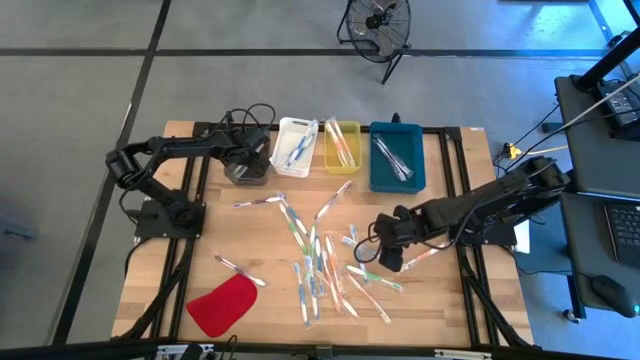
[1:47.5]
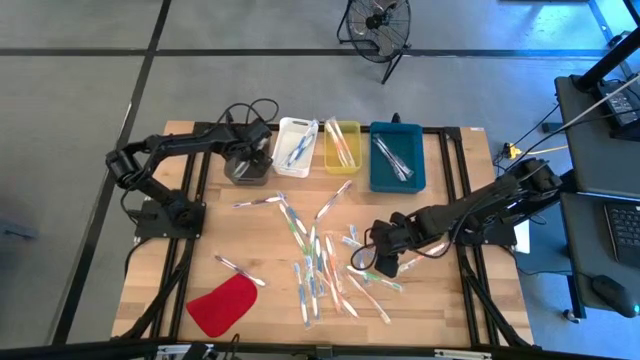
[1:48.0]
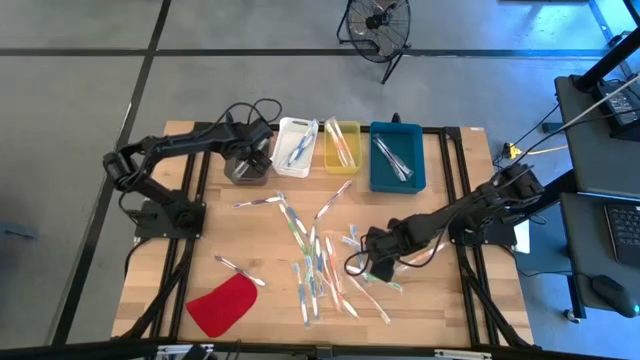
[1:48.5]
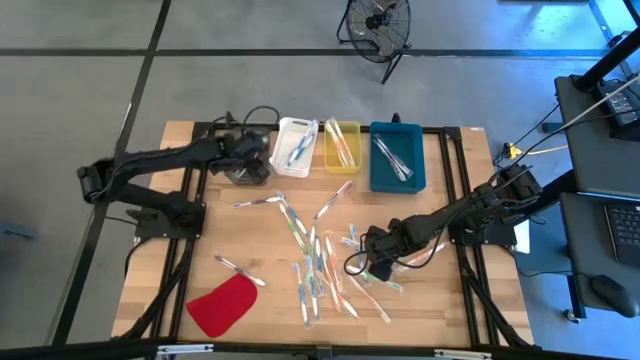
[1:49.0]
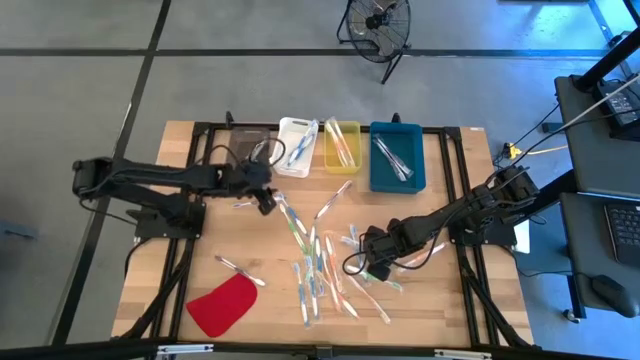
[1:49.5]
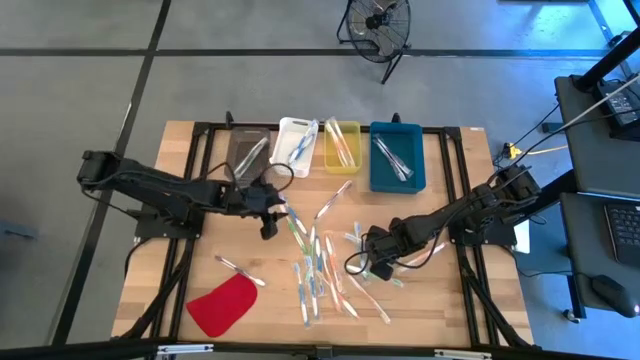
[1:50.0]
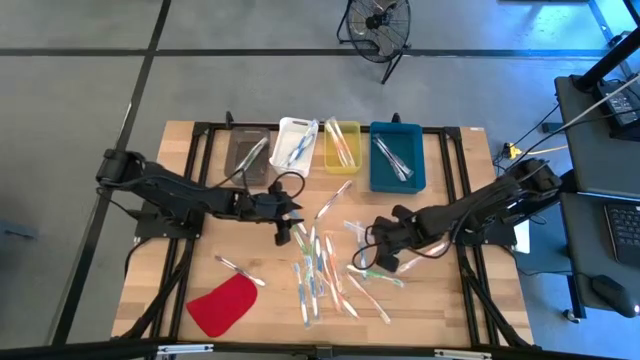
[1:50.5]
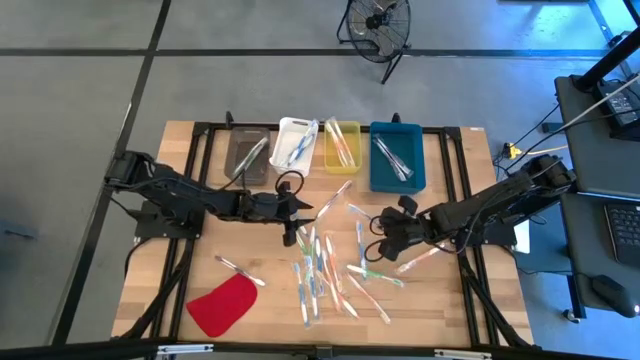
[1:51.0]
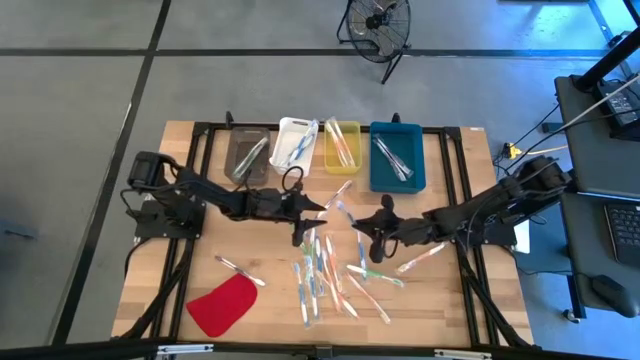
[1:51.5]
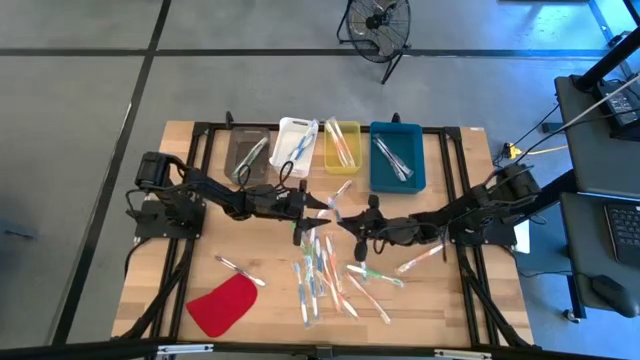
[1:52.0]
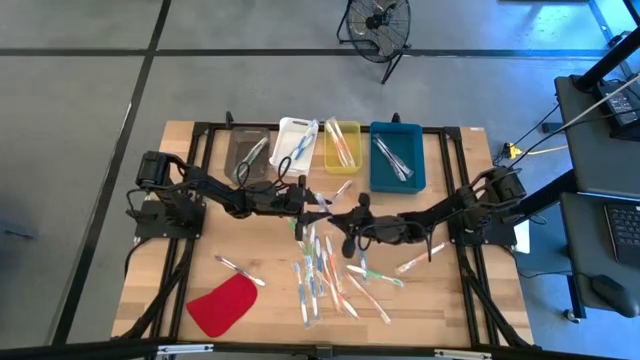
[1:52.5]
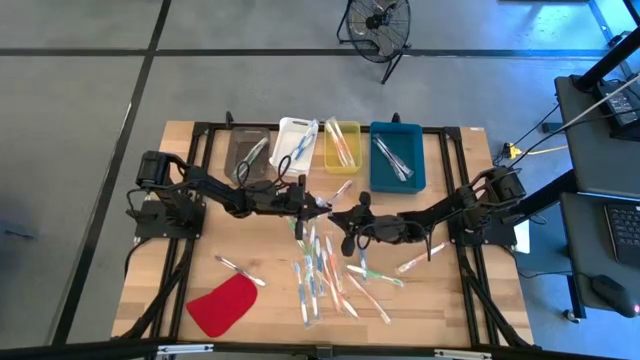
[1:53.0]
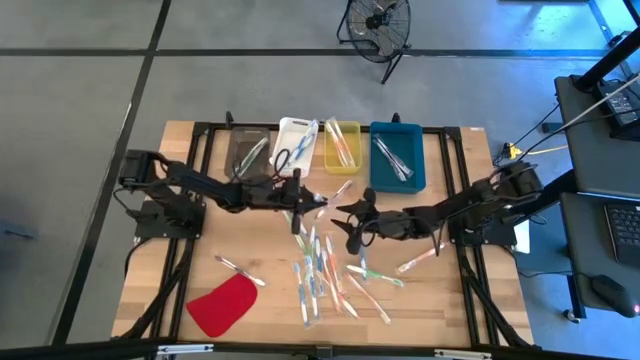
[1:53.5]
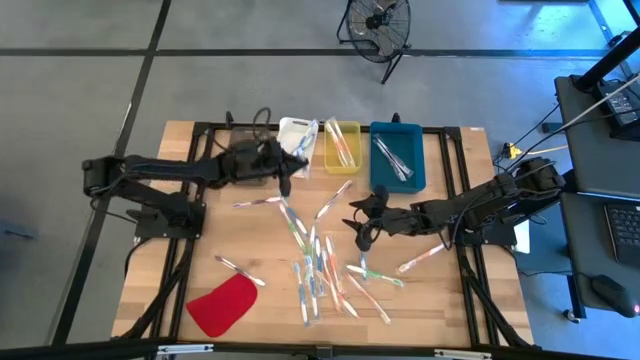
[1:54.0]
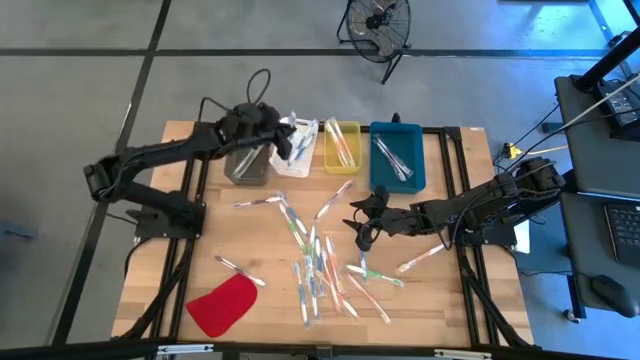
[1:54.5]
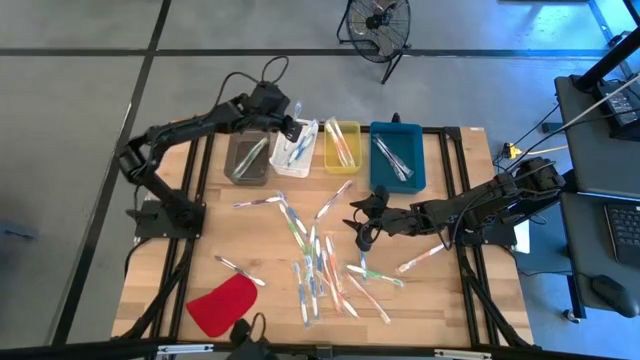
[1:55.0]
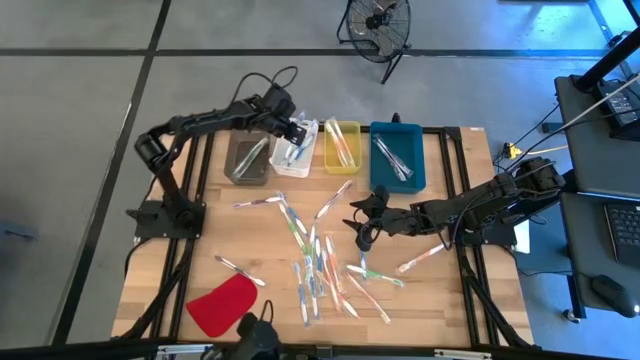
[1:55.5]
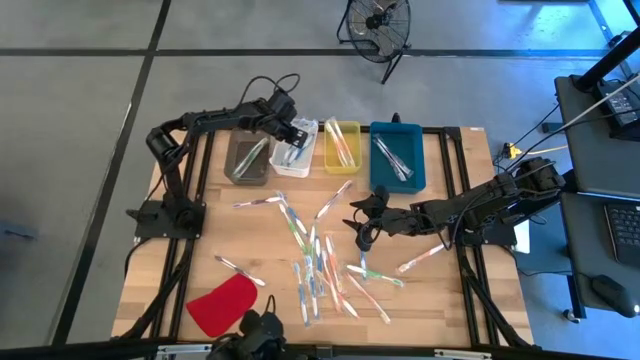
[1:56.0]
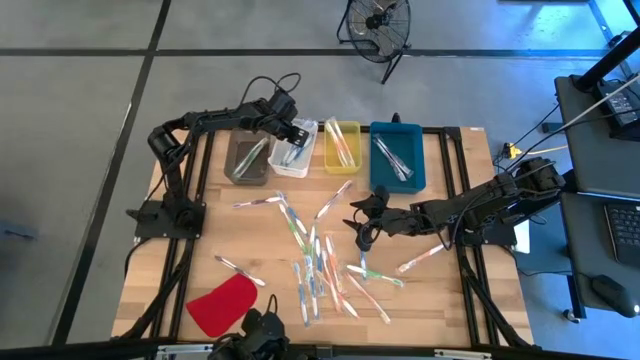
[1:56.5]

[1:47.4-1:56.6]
Task: Pick & Place Toothbrushes
Put the blue toothbrush into the white bin

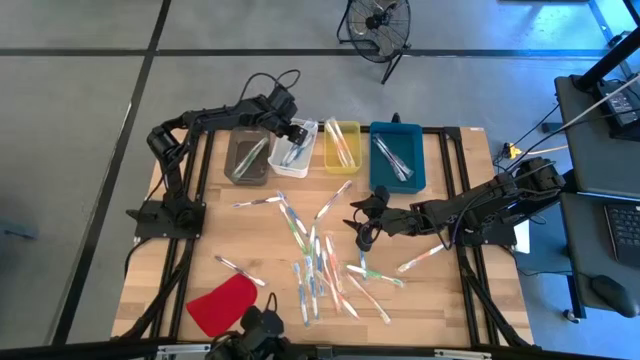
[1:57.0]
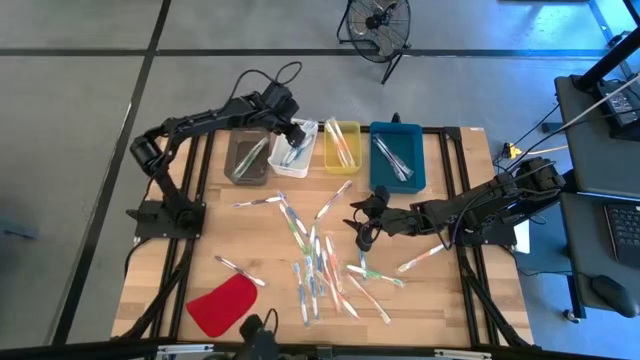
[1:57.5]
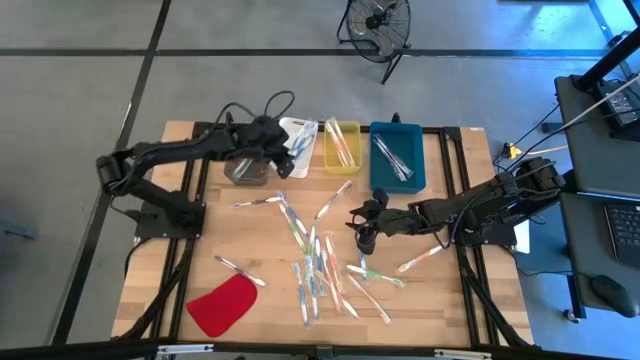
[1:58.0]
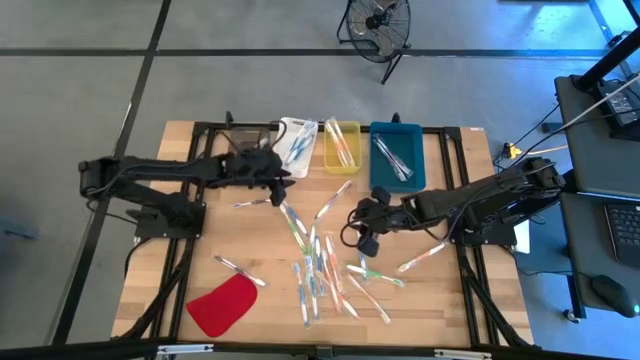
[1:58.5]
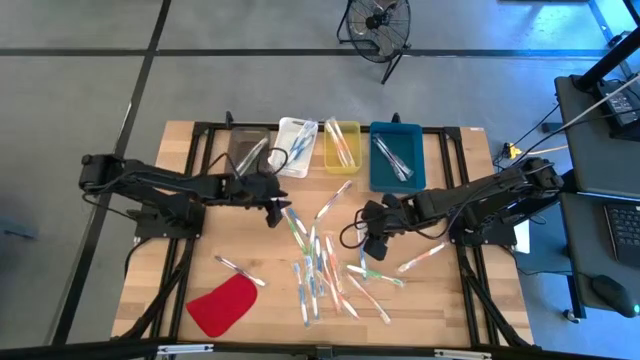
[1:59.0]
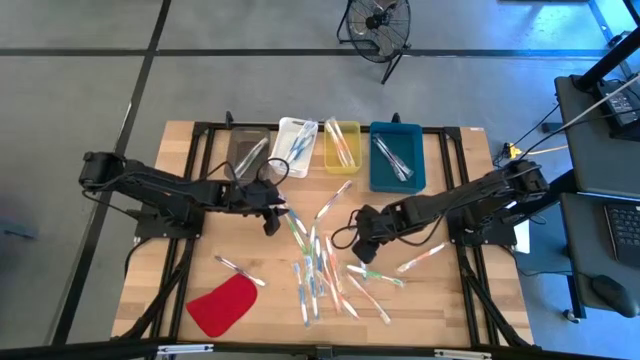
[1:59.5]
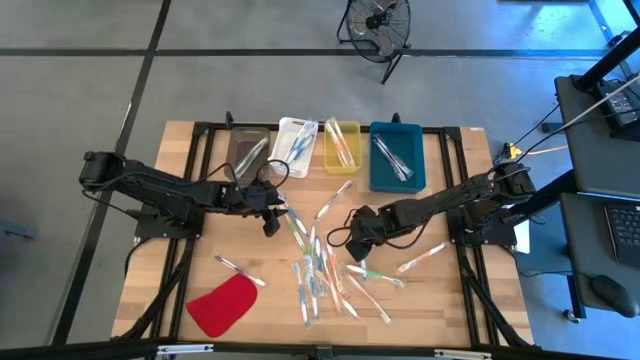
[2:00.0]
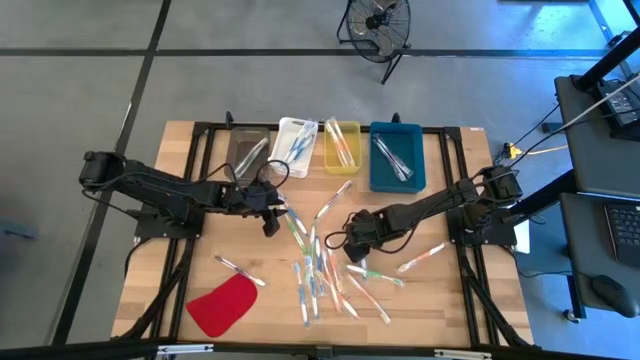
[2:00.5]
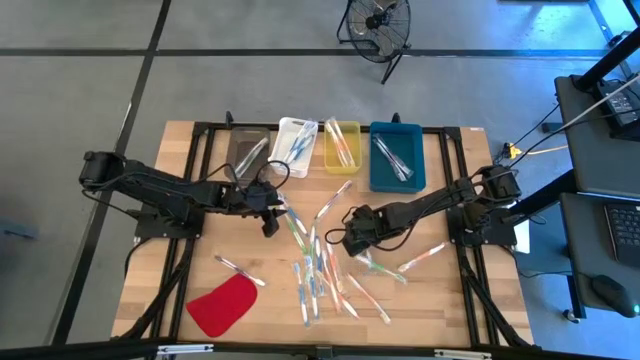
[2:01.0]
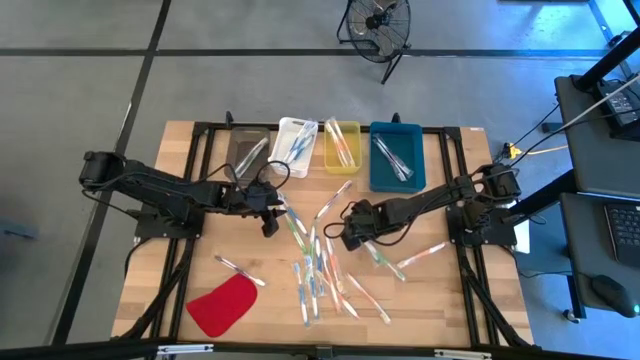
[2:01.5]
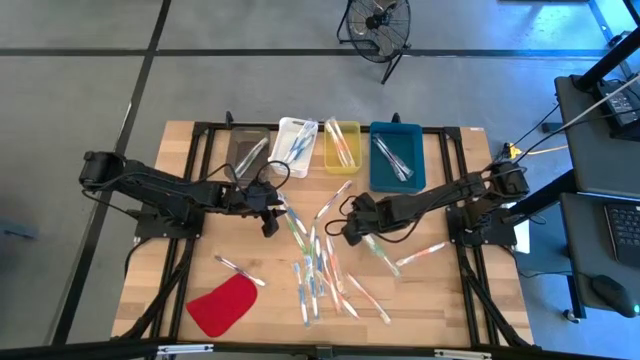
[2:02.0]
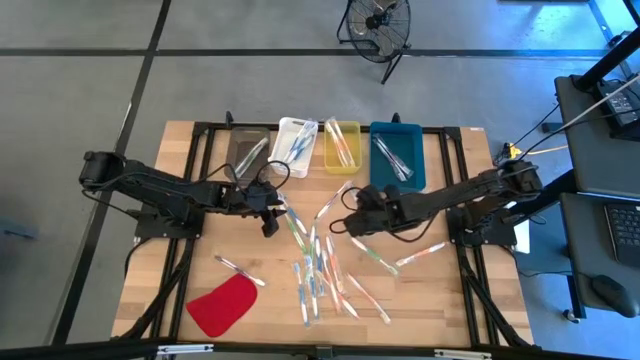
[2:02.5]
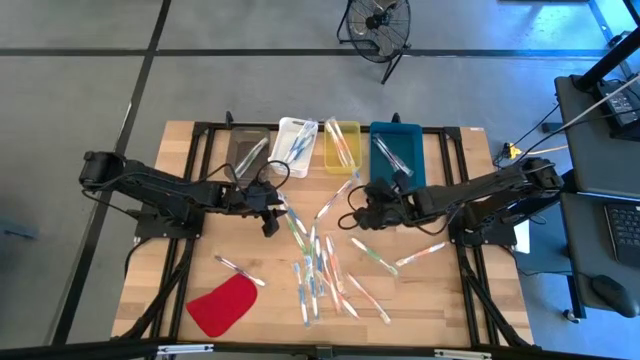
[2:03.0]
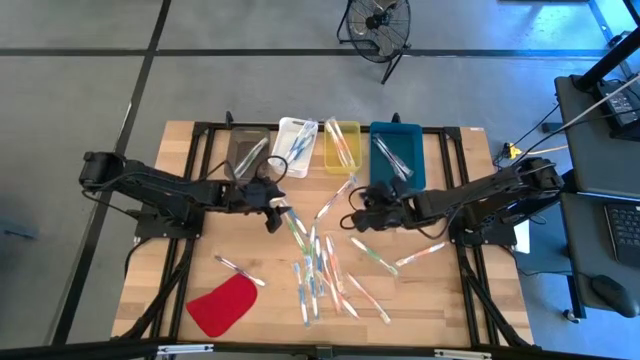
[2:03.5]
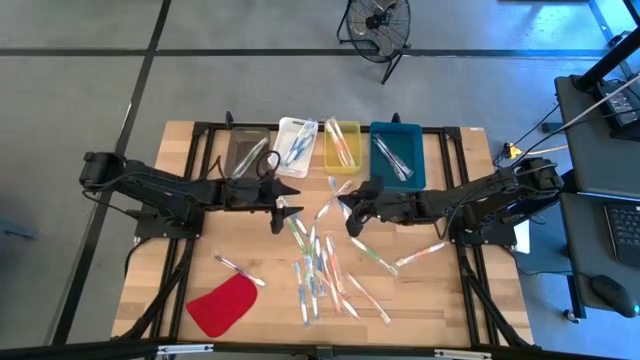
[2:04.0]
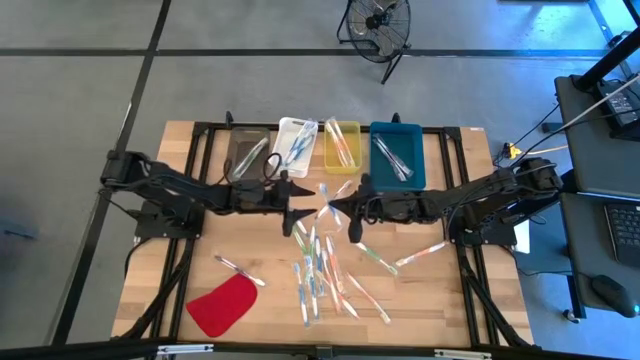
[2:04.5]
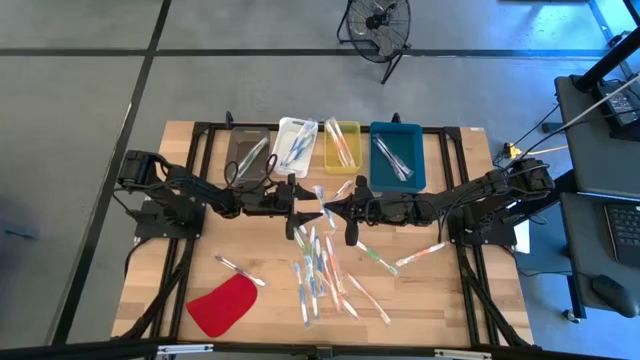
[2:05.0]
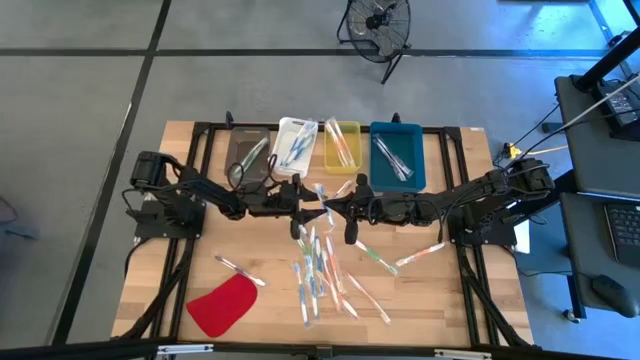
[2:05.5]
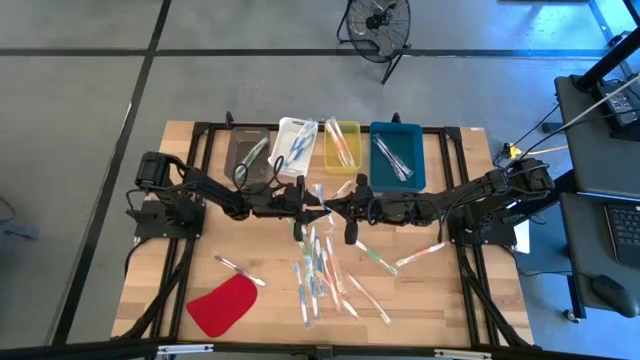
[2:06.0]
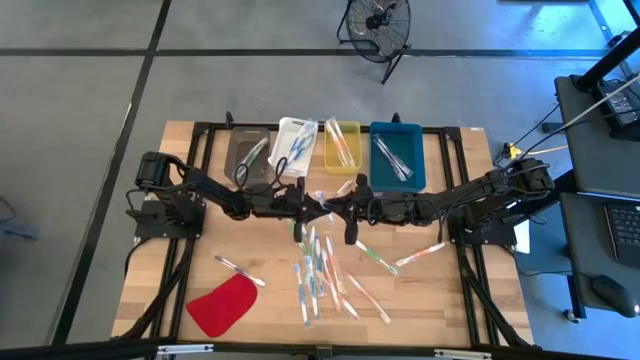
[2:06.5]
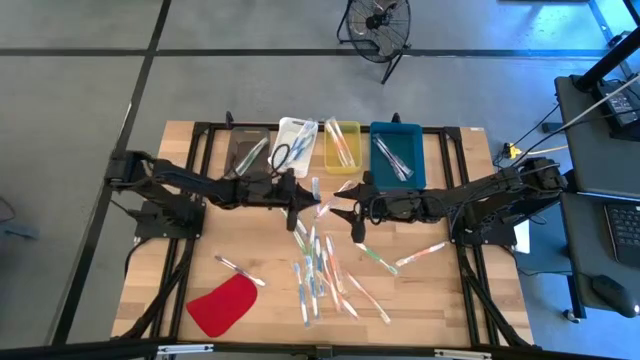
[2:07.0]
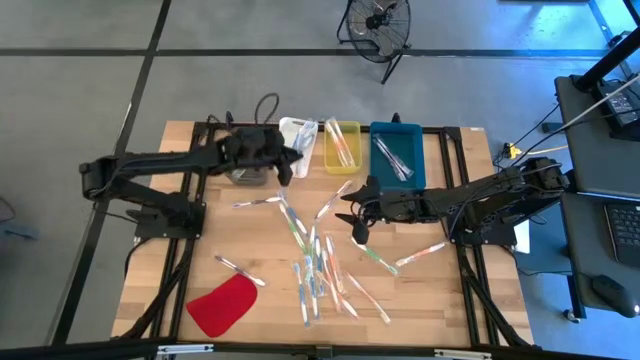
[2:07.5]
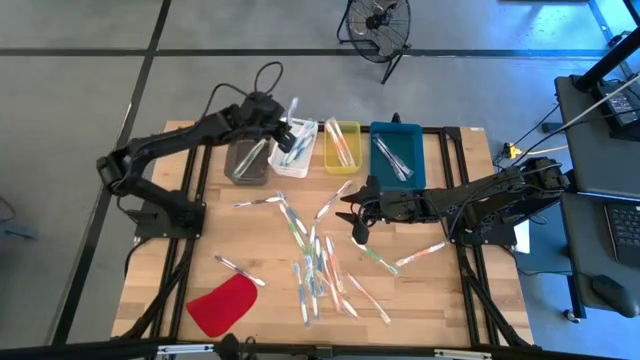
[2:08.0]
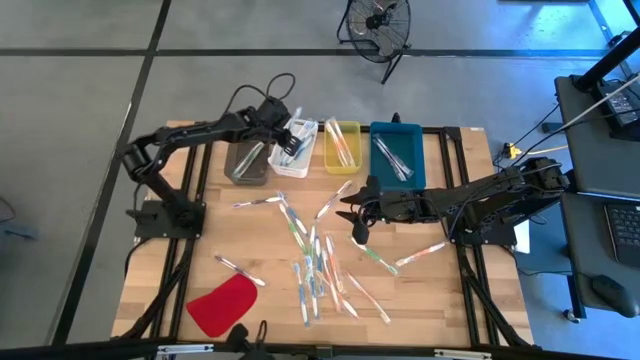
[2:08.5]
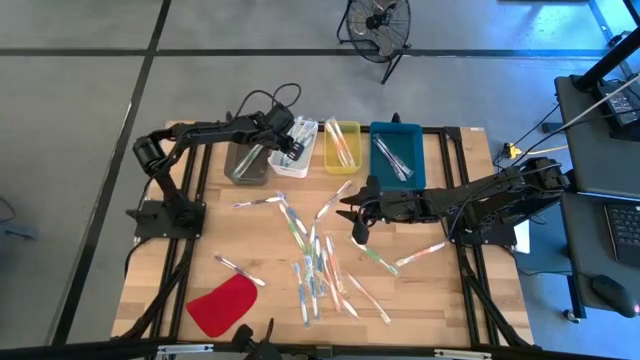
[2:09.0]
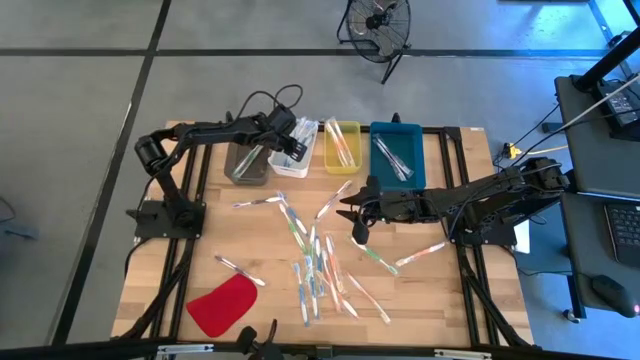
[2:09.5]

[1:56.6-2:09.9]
Put the blue toothbrush into the white bin
